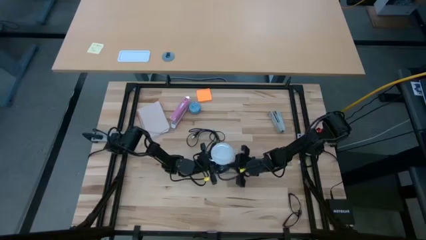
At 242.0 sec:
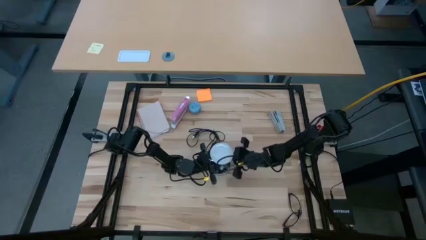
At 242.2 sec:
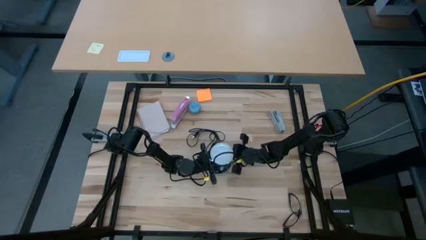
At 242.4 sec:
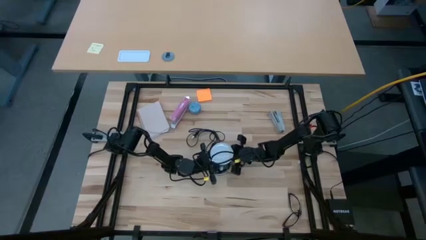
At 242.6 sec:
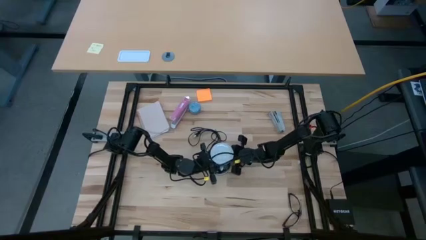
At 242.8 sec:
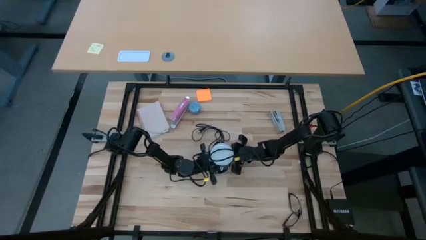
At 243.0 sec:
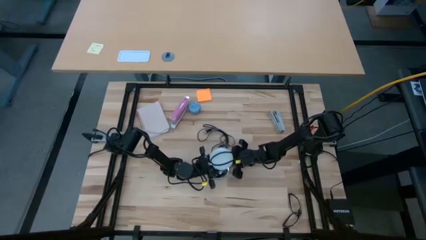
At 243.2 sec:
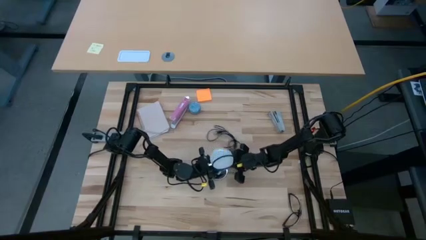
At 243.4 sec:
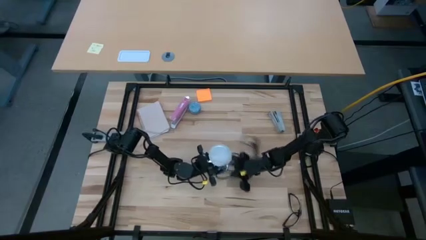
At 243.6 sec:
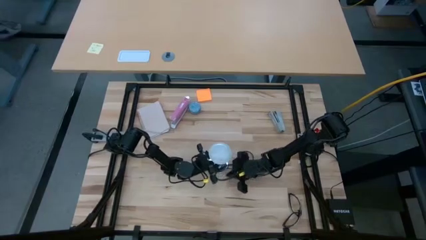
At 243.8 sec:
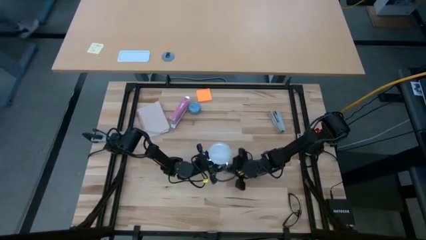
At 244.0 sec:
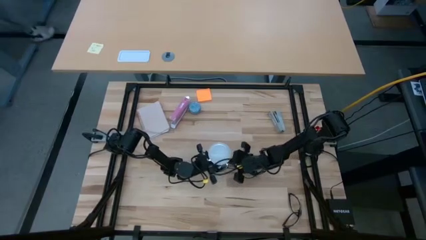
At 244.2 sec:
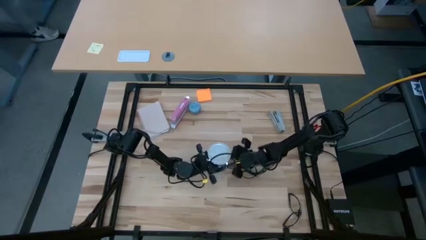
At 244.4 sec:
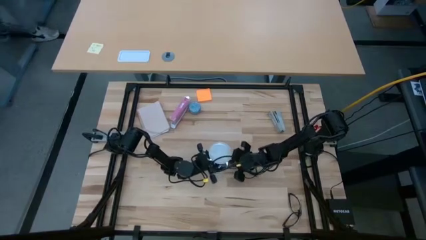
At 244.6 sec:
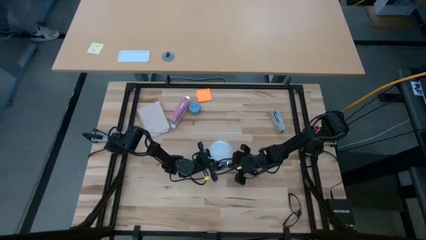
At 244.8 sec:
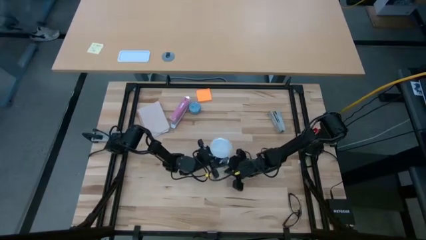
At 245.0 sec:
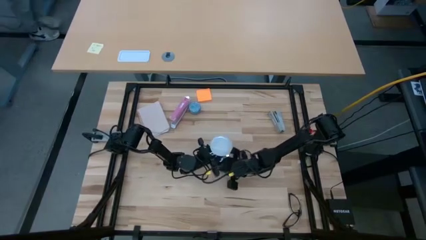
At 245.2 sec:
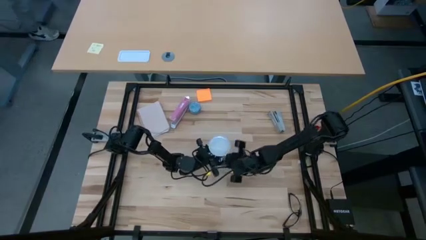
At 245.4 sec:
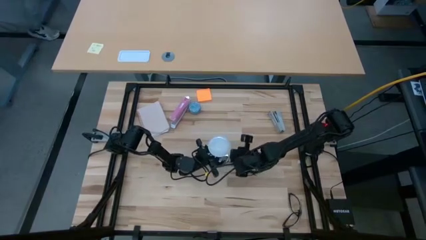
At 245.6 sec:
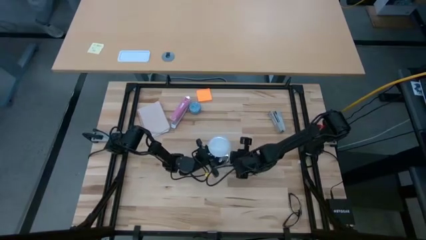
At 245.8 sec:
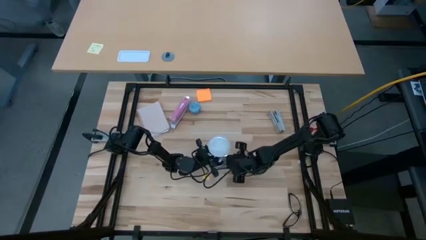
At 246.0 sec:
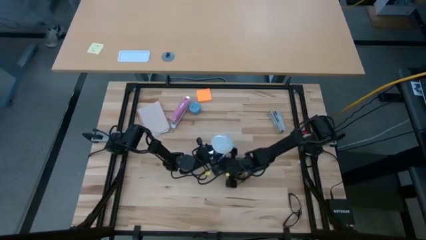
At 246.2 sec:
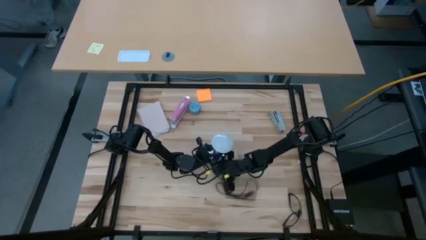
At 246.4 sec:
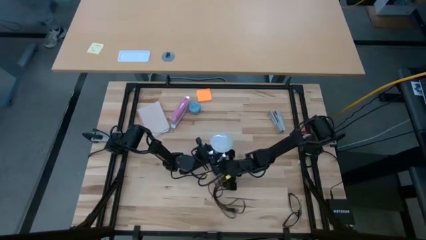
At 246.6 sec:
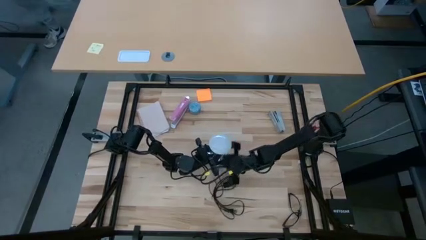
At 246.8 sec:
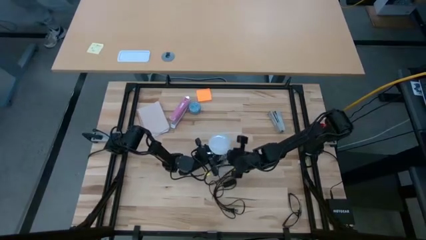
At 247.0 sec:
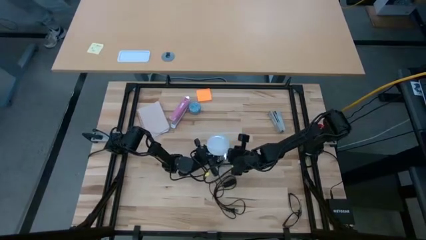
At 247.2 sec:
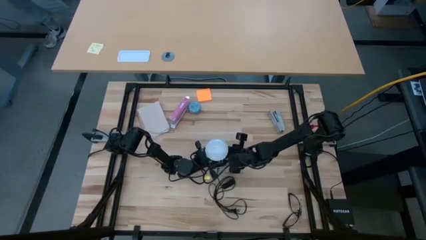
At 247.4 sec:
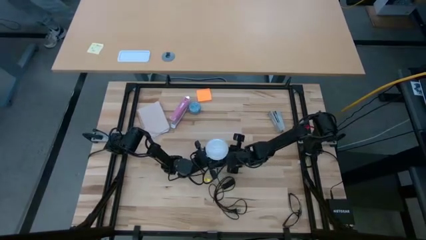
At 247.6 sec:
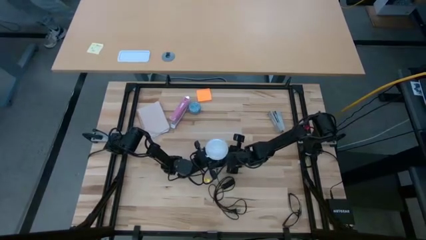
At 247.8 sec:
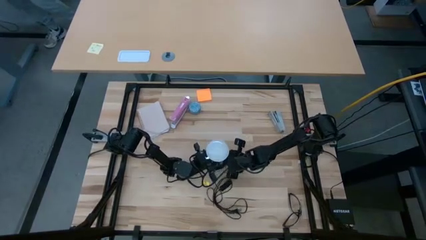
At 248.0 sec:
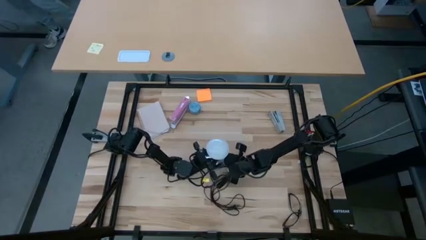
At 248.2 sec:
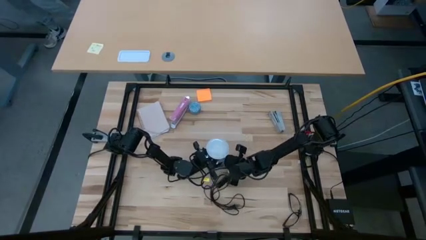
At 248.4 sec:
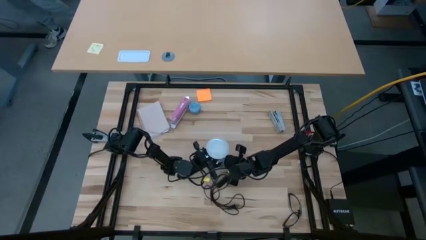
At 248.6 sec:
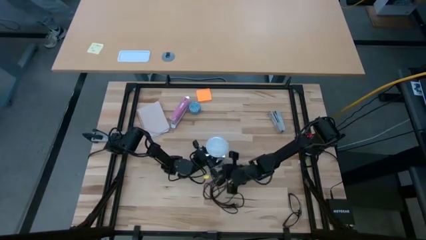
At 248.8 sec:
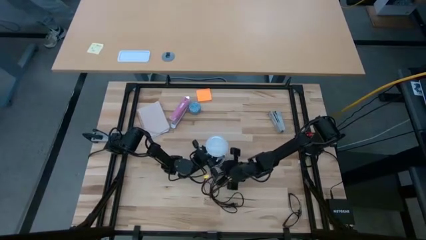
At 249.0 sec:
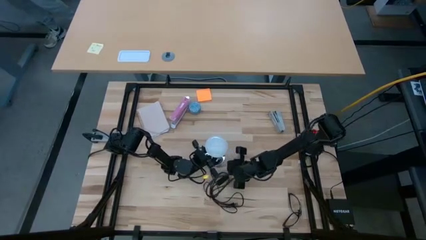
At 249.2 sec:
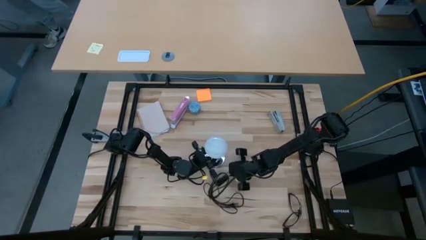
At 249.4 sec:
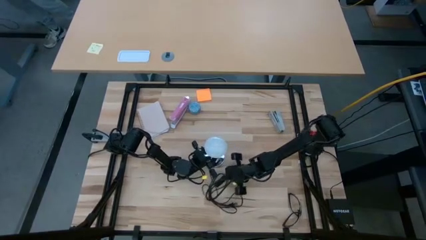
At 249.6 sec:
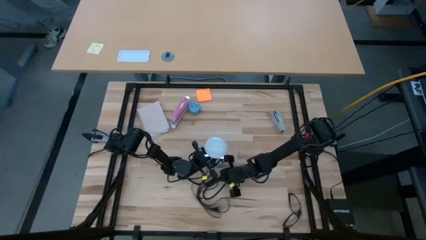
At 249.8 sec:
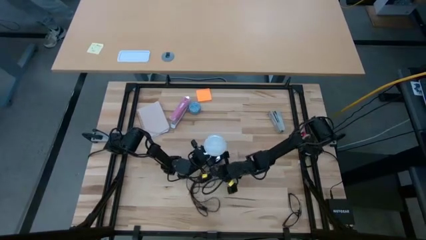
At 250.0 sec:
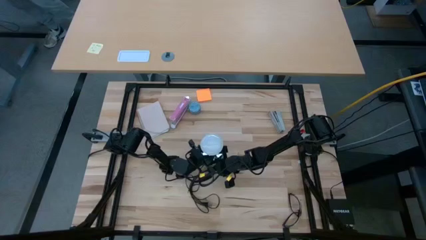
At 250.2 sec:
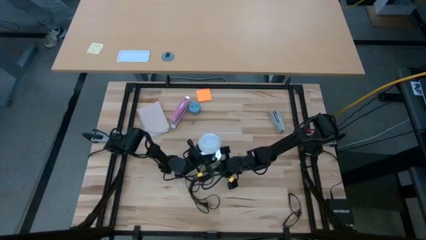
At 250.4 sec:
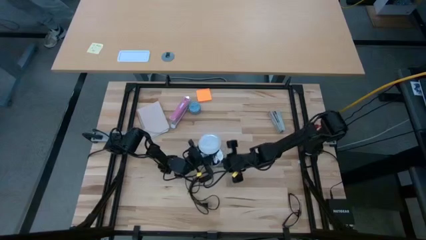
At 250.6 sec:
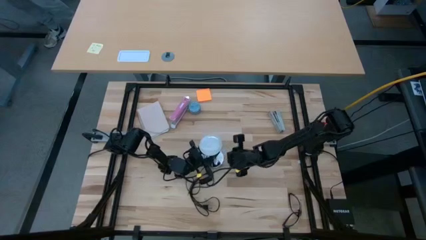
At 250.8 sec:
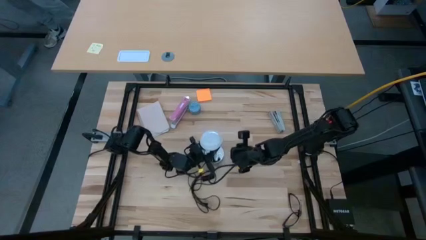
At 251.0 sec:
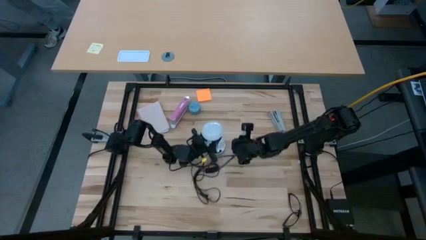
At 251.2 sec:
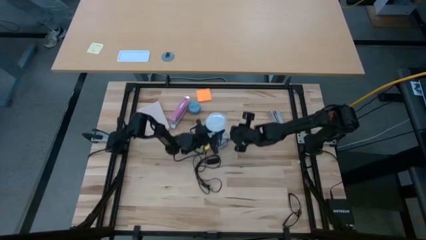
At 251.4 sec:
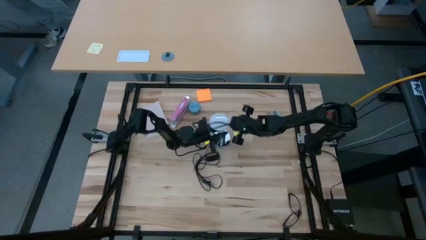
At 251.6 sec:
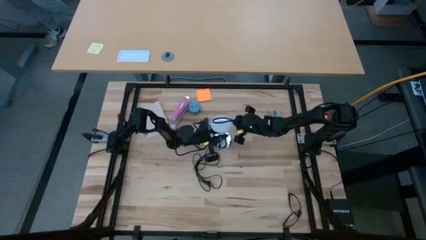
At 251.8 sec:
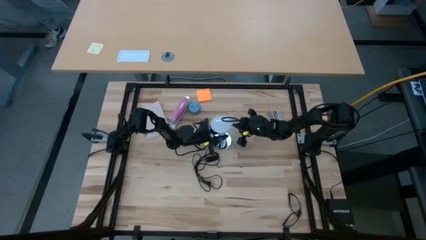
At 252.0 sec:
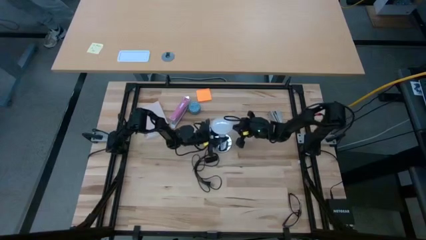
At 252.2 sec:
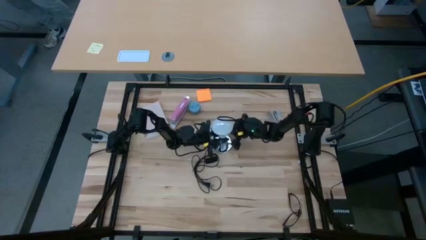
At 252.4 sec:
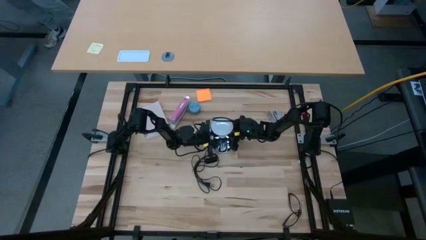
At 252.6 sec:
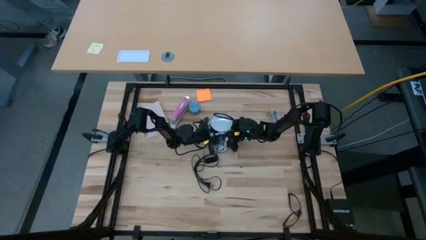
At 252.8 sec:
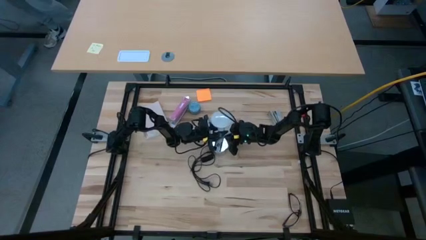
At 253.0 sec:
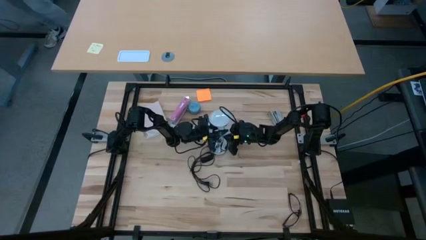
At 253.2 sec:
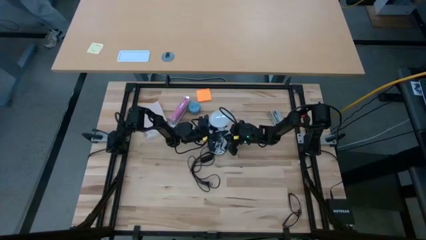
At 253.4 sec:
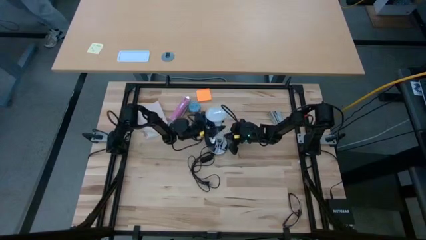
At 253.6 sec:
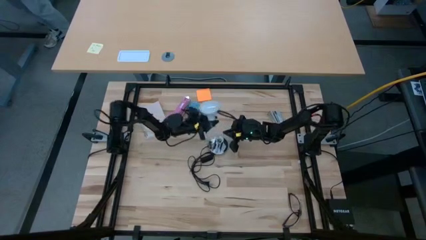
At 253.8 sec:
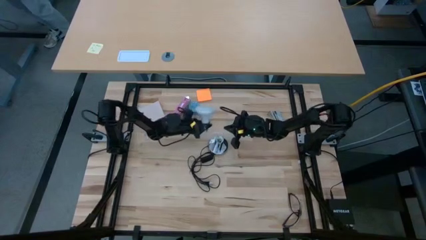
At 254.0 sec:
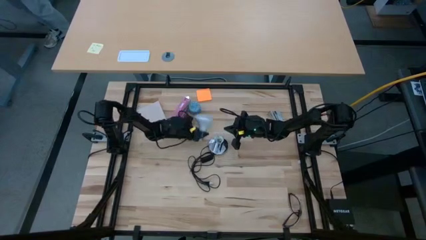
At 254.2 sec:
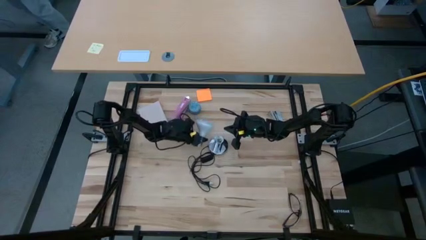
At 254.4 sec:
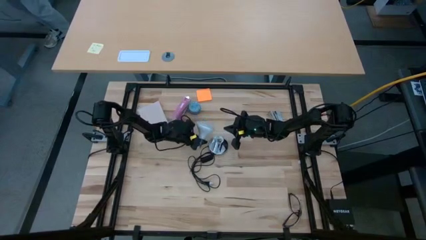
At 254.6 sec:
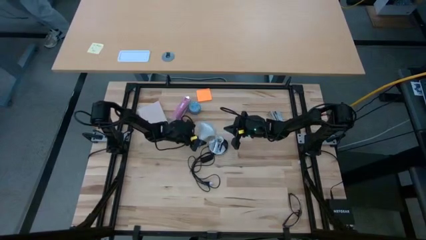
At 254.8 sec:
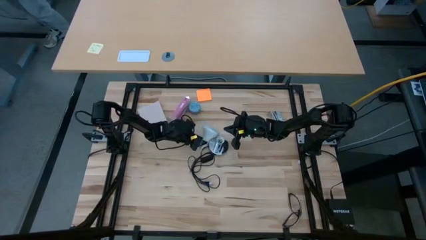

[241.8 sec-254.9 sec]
Task: Screw lightbulb
Remove the lightbulb from the lamp

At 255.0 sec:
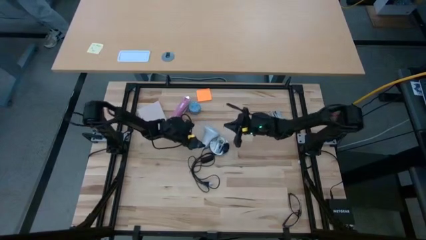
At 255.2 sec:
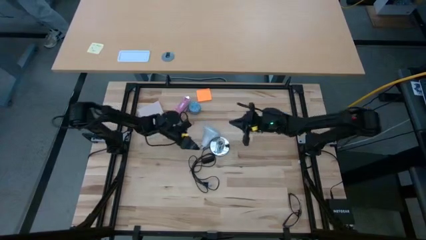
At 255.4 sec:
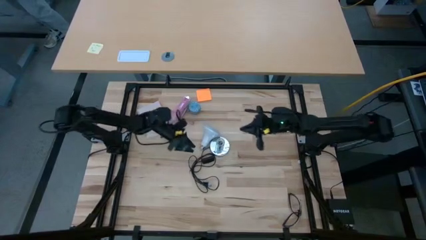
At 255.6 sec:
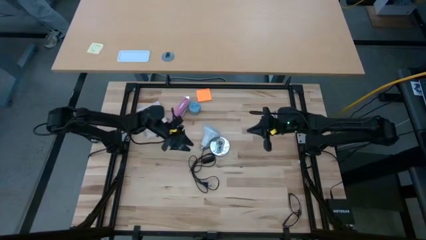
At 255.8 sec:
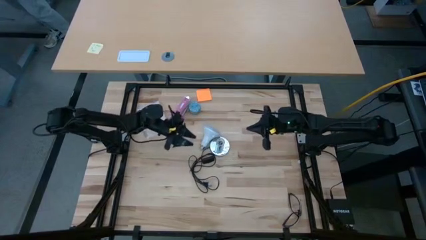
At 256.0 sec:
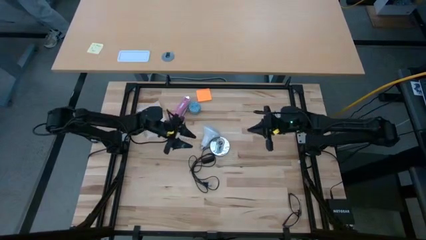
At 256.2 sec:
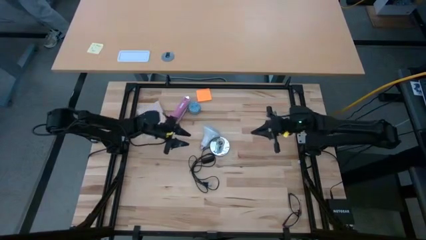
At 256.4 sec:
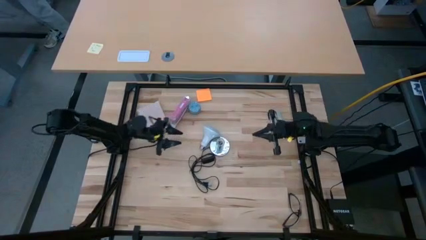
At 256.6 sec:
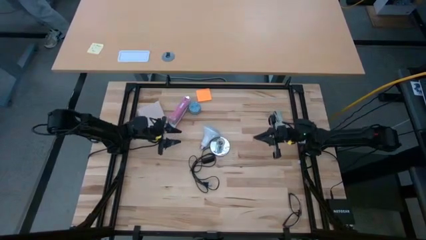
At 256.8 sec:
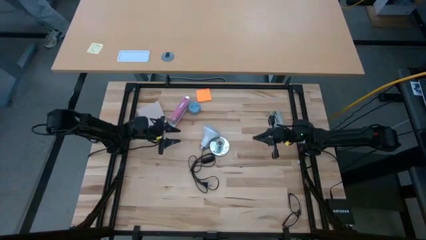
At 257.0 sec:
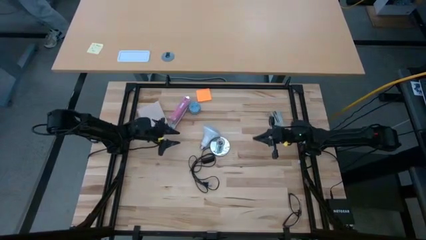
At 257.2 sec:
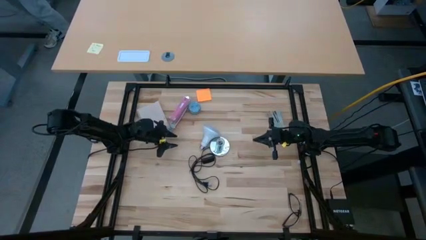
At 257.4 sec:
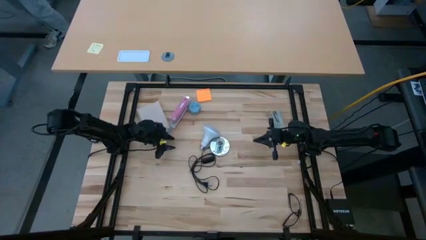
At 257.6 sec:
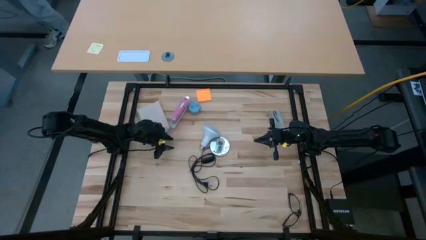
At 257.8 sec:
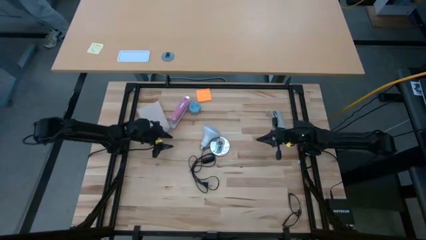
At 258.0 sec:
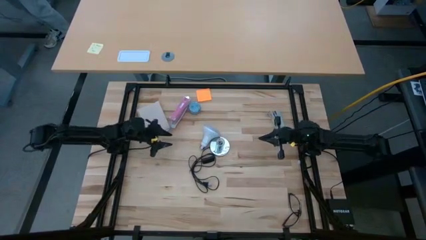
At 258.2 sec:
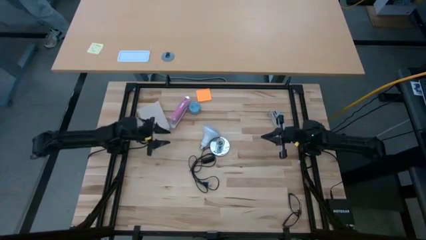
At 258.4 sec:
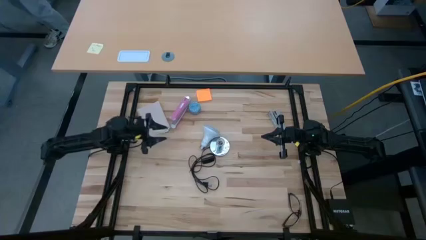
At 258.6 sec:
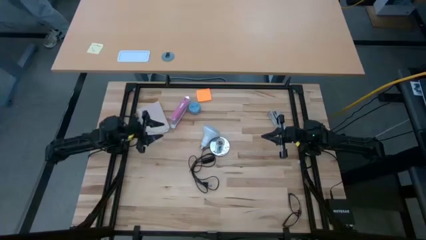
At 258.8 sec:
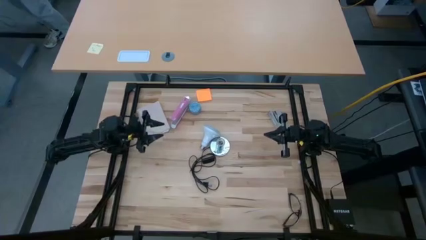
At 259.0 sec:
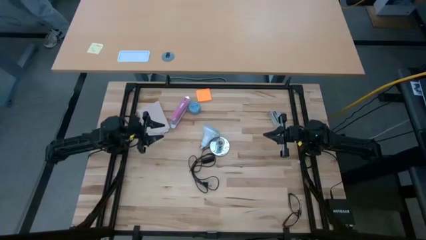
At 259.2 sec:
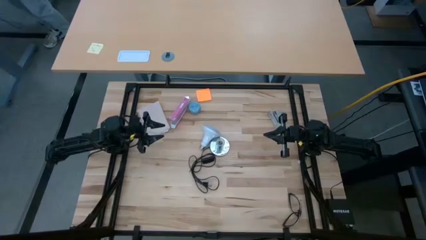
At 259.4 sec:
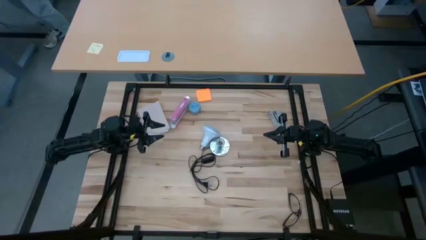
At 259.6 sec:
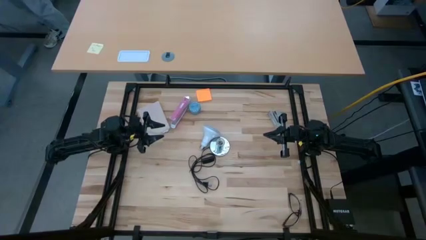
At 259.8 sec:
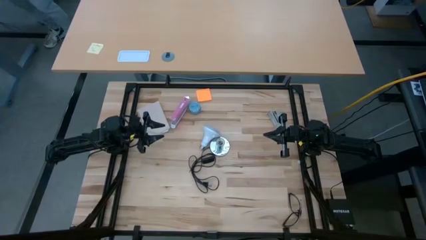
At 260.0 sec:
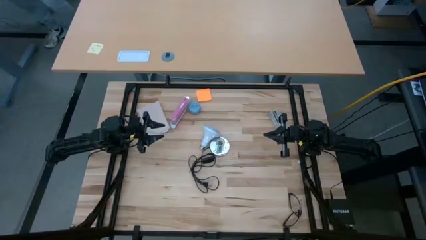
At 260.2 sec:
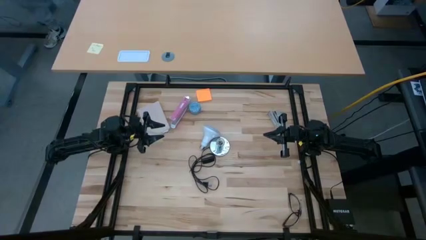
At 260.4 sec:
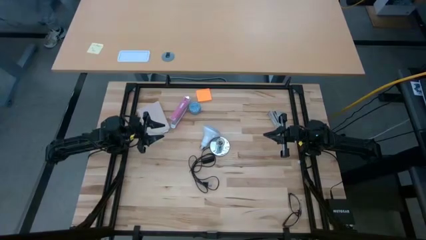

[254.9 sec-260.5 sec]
Return to Home Position
